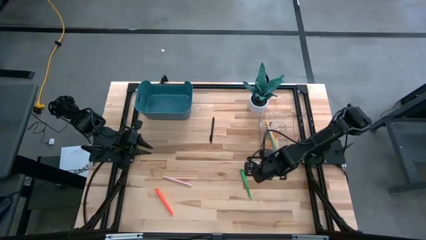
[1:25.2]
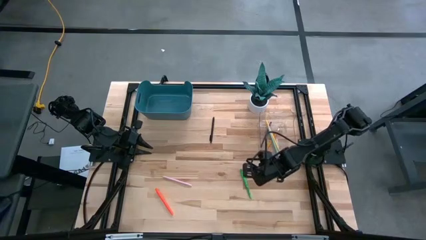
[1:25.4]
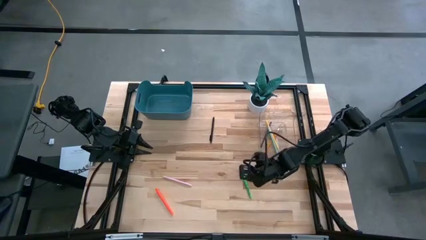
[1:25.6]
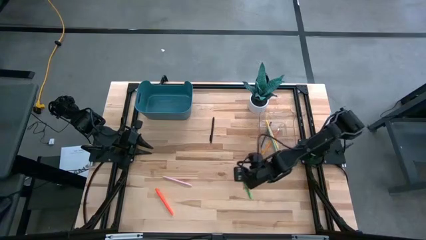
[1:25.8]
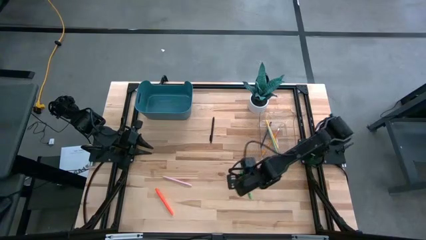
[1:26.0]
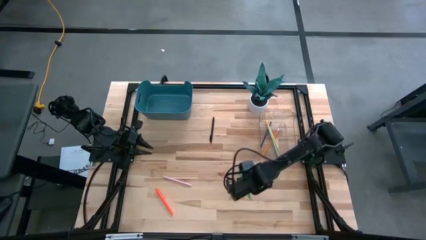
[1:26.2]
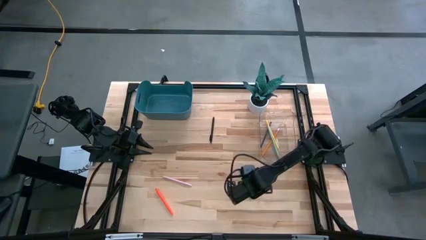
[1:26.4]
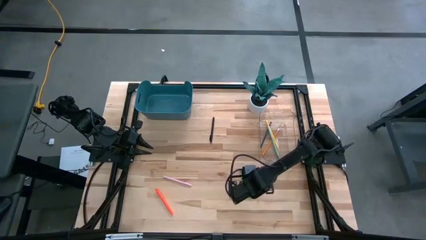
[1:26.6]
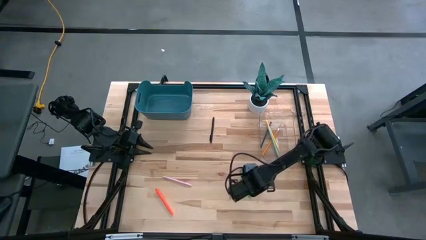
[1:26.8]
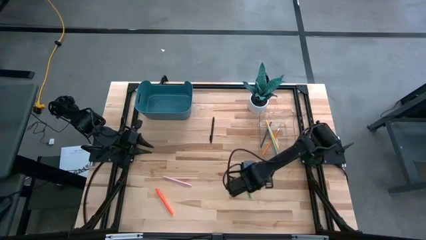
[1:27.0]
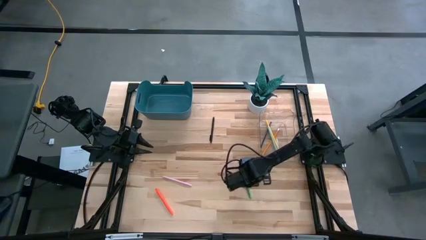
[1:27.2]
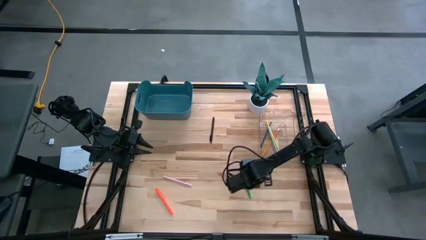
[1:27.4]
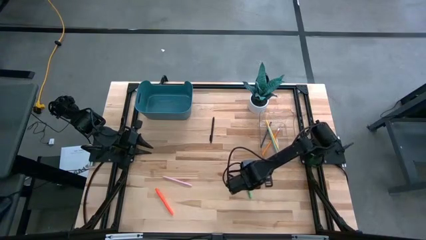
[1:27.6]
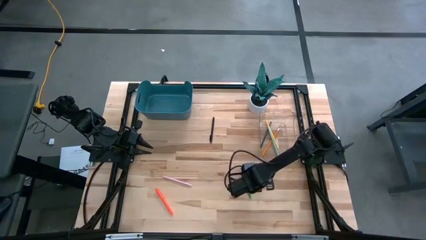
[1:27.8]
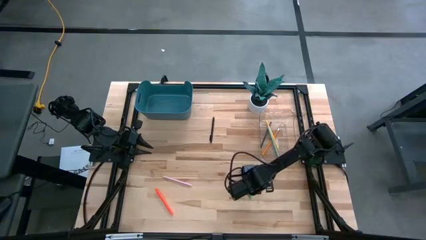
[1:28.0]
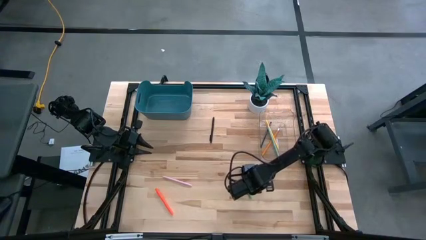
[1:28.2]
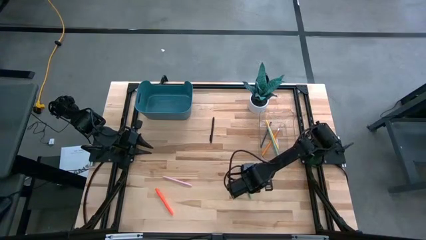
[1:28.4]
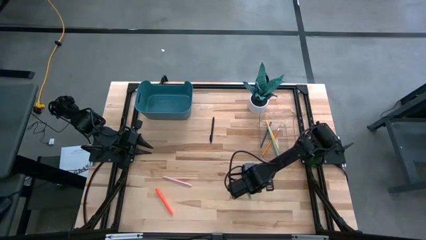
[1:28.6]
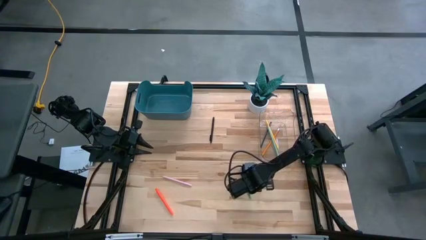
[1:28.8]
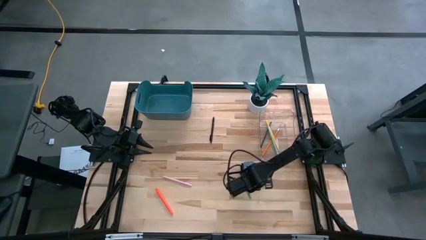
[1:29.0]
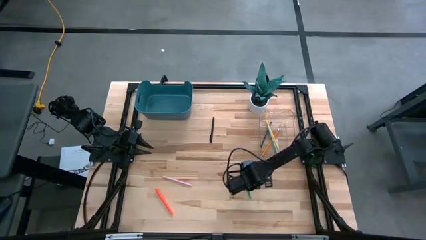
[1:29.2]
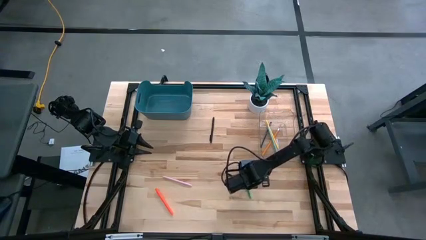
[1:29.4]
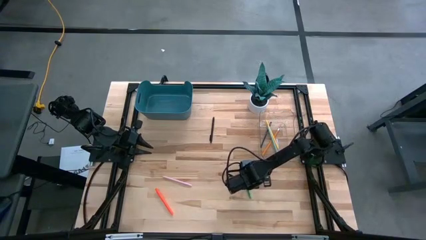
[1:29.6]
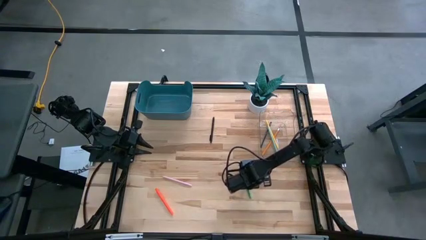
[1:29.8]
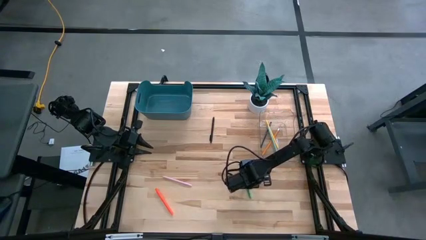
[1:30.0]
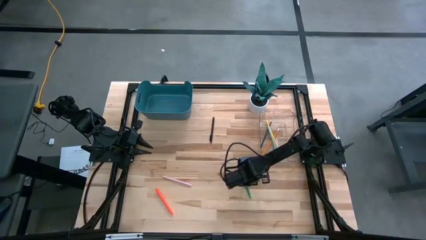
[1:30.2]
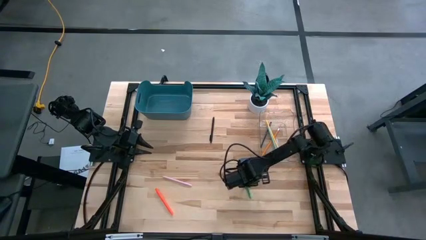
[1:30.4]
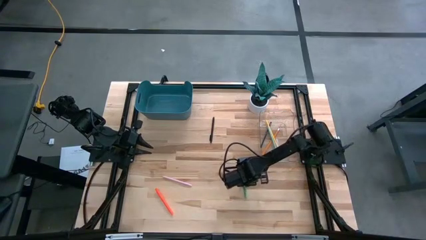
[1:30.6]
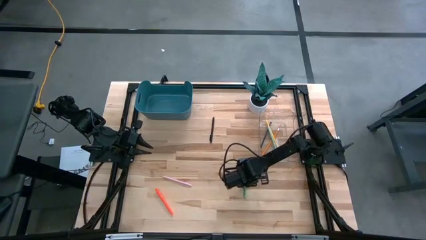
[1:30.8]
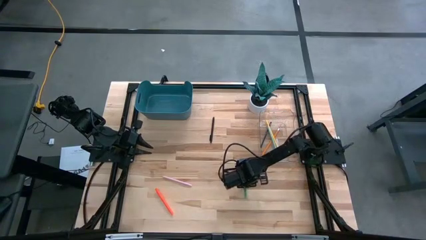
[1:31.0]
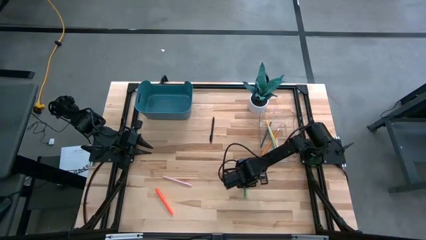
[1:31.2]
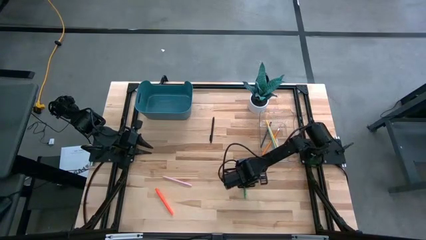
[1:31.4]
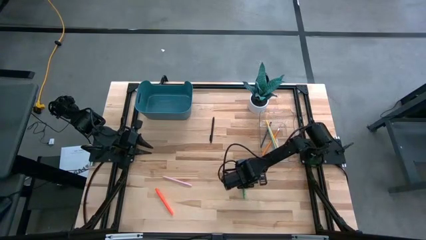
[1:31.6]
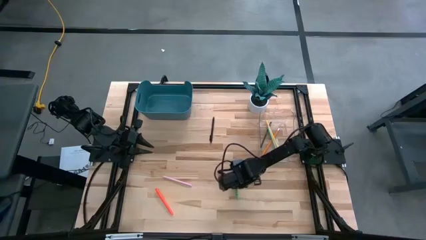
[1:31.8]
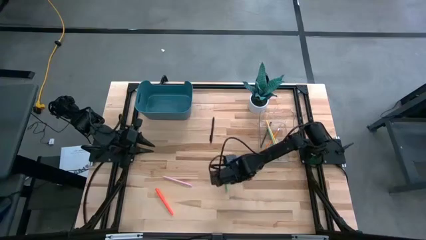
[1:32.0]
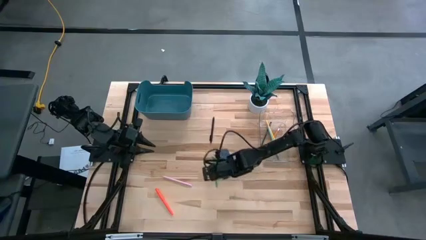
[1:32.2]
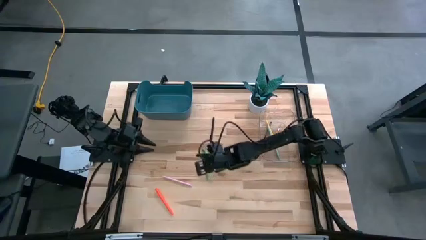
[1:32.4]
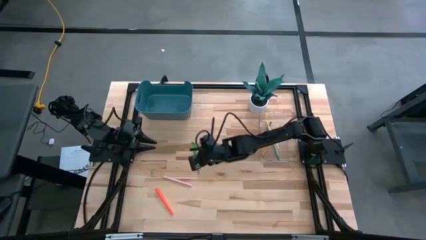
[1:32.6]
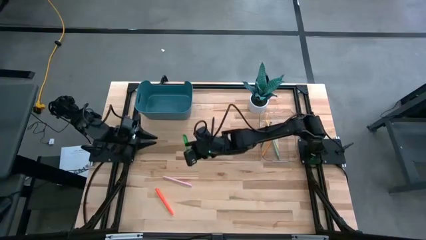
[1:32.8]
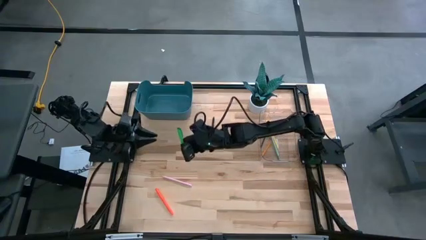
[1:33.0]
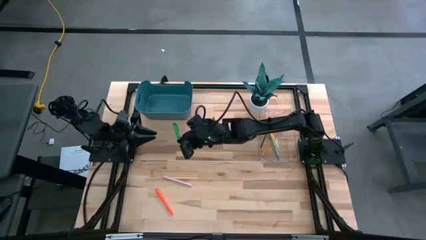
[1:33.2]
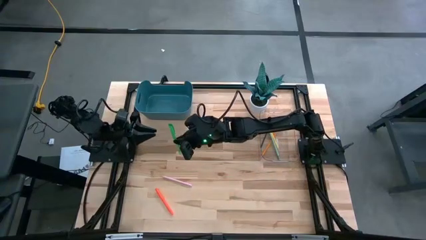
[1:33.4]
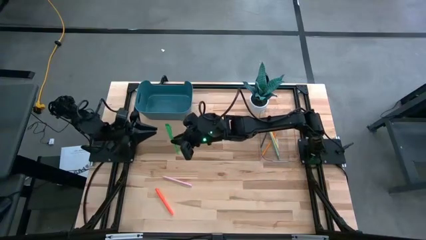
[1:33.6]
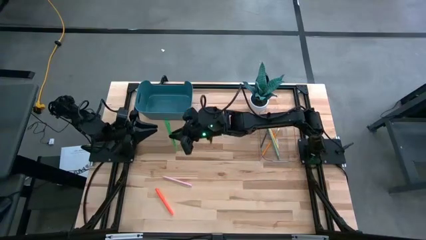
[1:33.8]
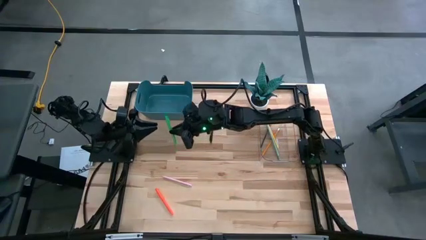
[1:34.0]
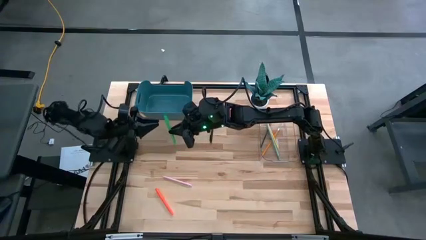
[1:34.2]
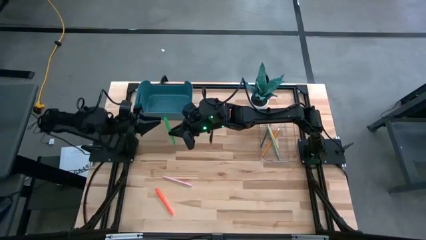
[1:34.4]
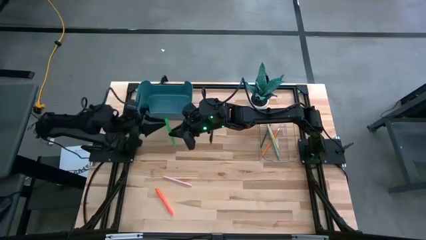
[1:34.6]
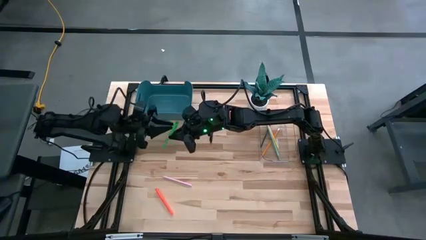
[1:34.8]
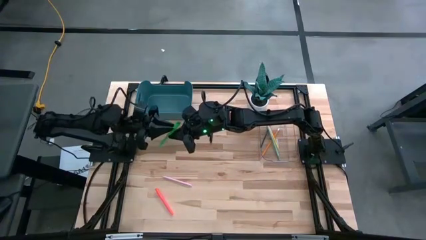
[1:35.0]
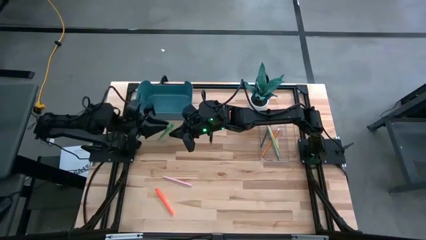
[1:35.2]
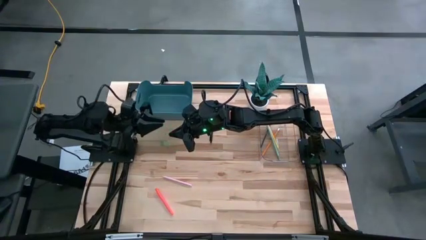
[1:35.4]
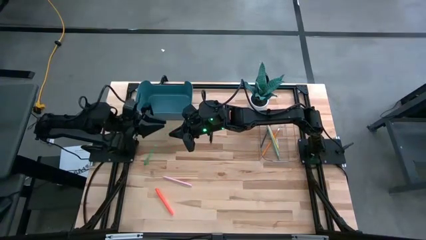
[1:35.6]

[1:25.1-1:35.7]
Task: Sort pens & pencils
Put the green pen into the blue bin

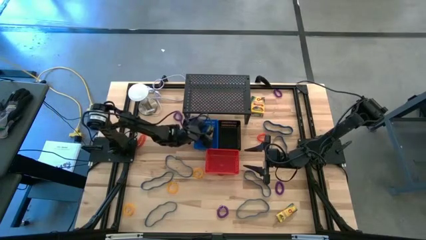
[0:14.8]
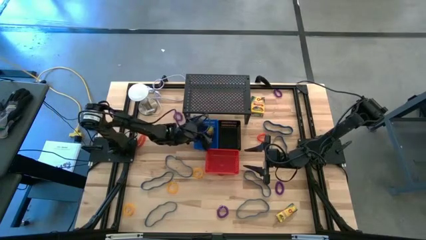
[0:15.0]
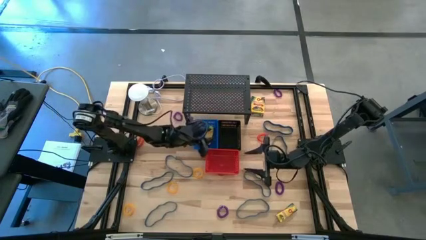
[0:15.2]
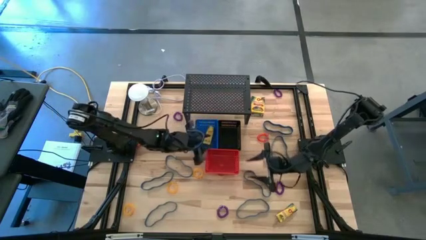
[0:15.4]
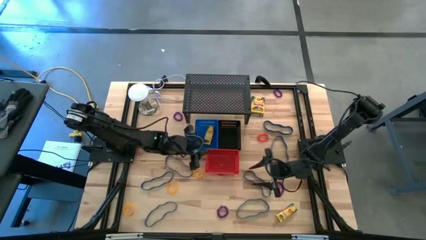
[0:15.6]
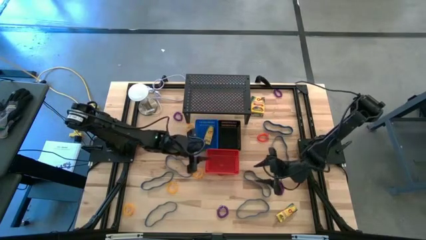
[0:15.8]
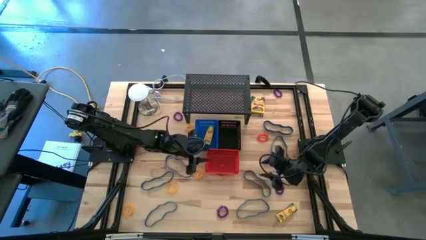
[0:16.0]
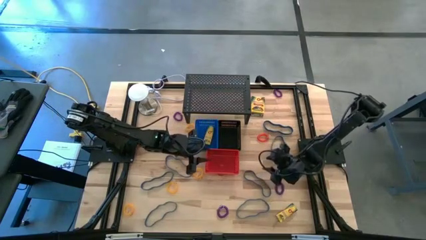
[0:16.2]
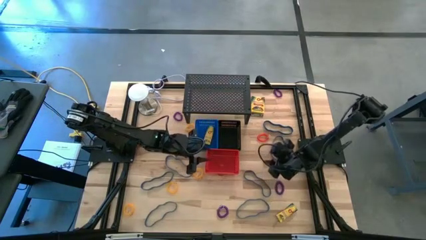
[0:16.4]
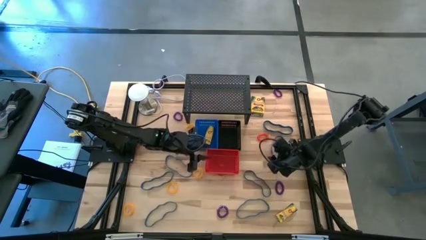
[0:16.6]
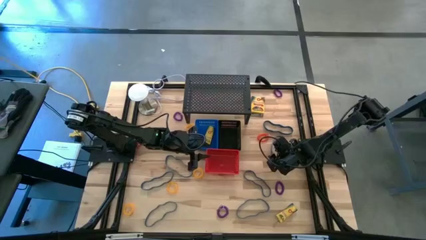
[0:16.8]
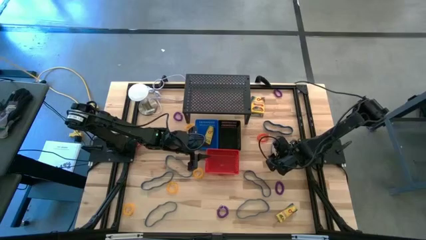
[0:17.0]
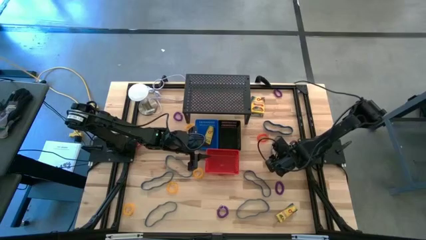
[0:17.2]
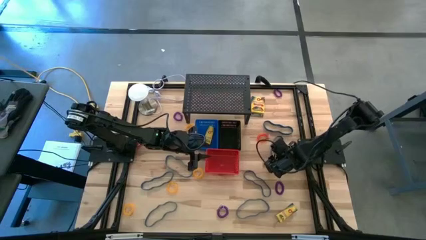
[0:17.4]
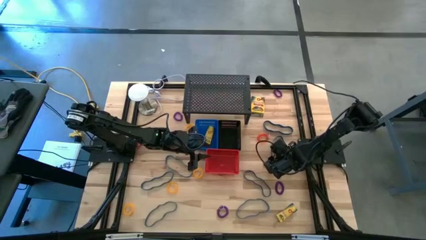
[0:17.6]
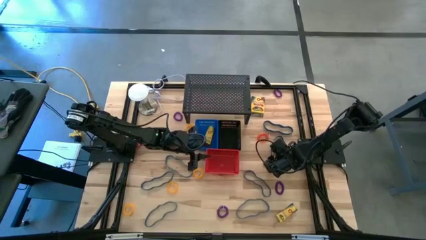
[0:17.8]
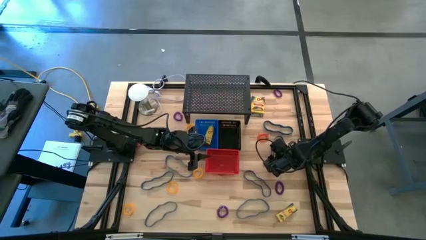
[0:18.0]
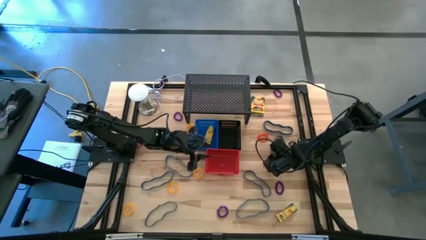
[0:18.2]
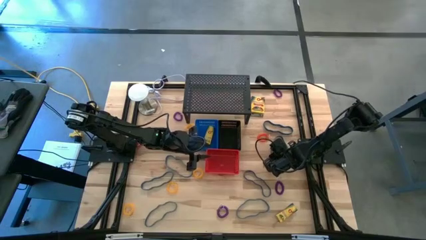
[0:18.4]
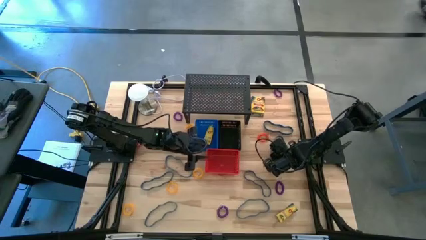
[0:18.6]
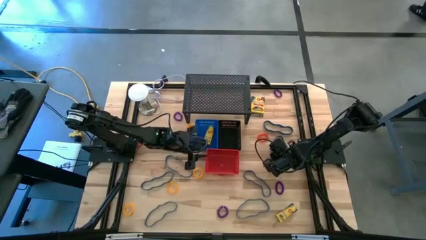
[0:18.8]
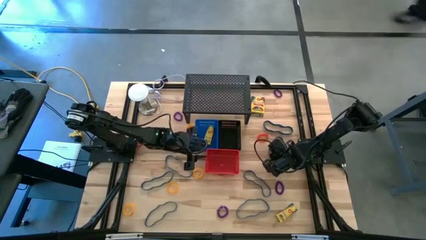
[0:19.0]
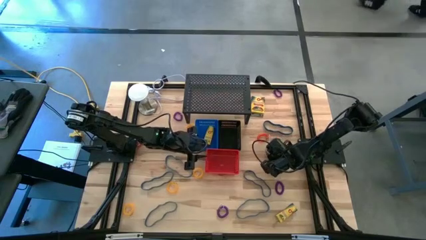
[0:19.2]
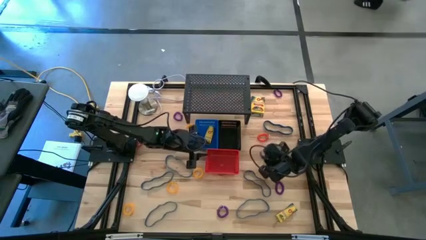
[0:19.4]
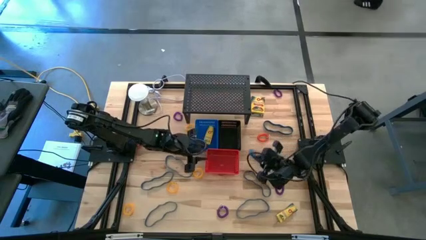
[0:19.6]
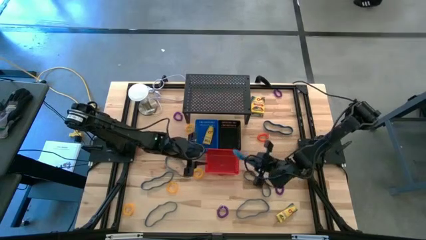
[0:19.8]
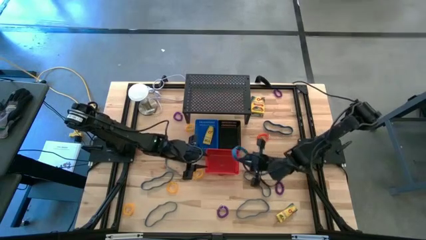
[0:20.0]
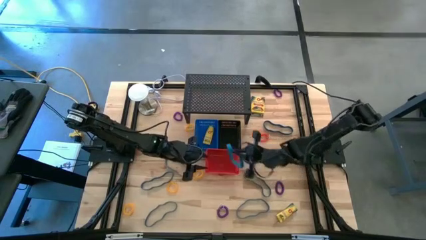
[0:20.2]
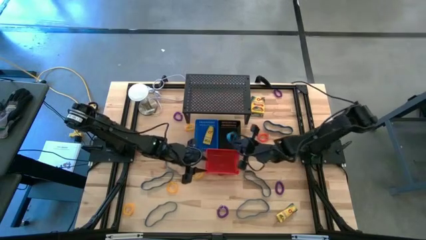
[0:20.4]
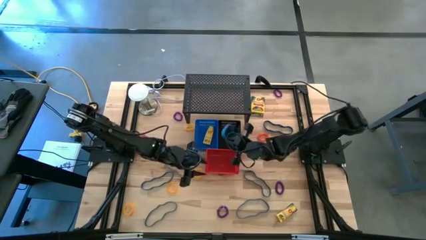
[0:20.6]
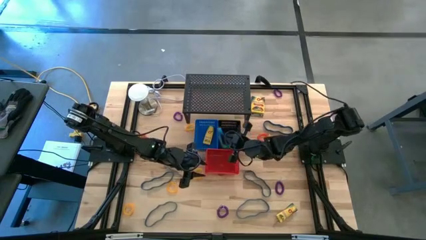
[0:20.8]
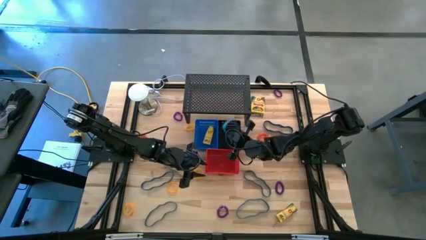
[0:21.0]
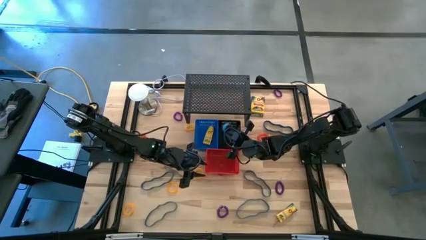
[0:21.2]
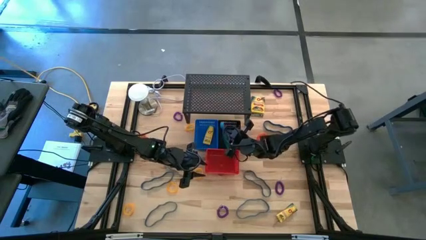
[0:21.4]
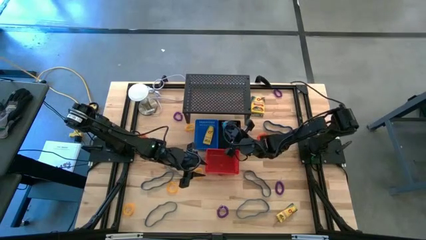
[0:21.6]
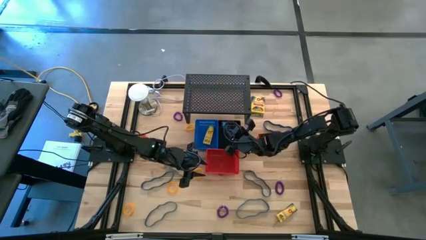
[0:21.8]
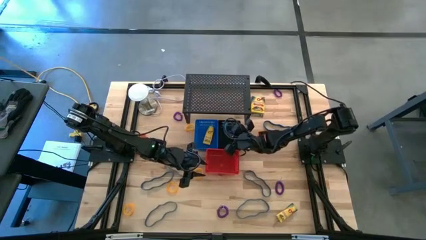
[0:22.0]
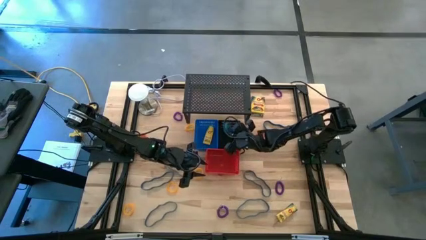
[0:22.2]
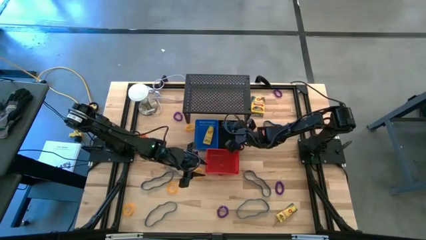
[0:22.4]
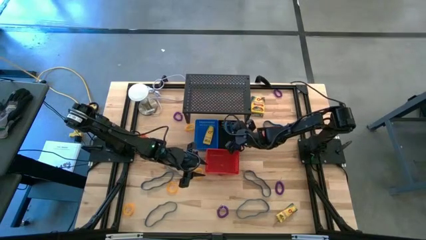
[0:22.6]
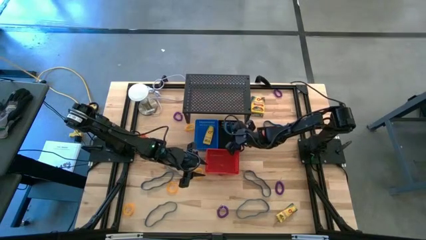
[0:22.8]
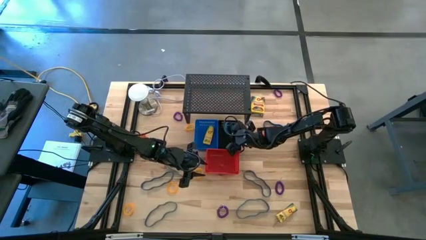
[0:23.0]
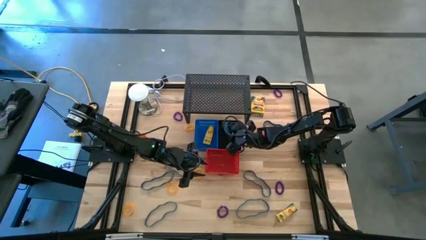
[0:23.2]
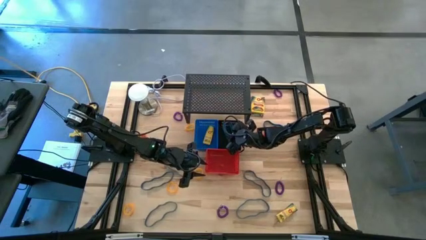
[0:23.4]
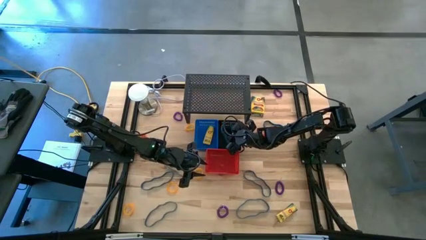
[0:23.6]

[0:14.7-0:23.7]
Task: Pick & Place Office Desk Supplies
Put the blue rubber band into the black bin
